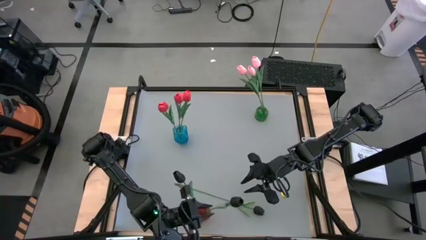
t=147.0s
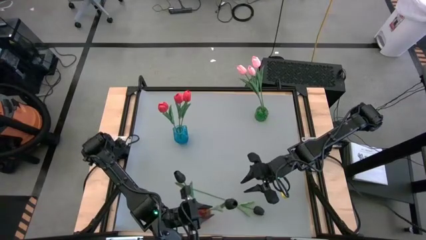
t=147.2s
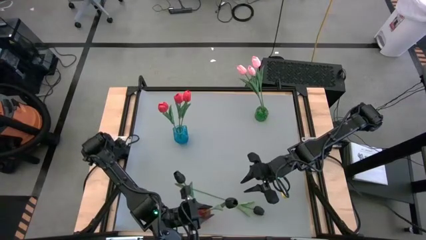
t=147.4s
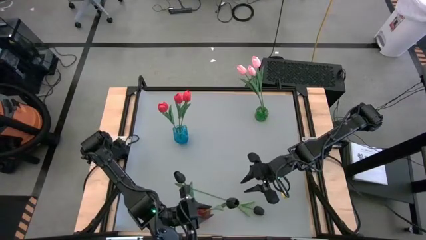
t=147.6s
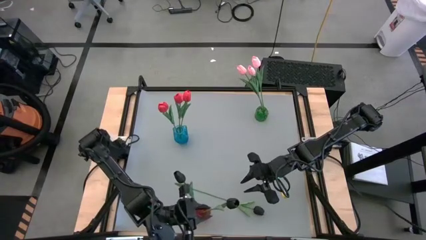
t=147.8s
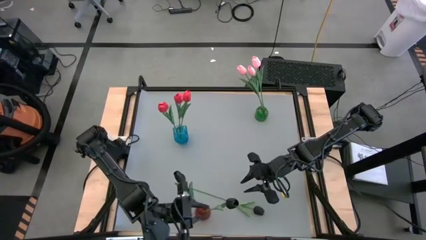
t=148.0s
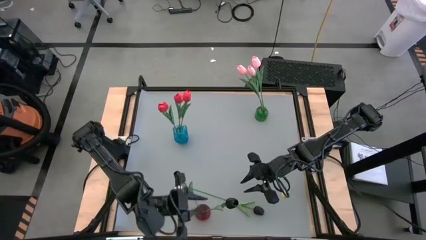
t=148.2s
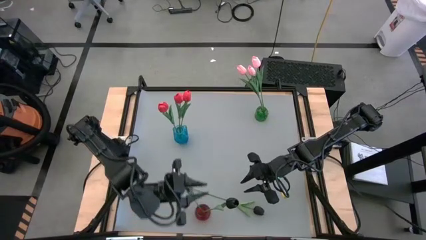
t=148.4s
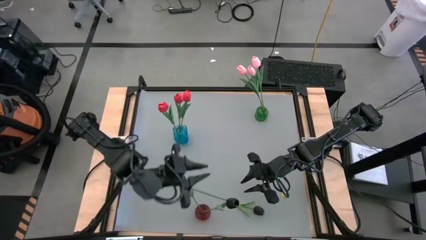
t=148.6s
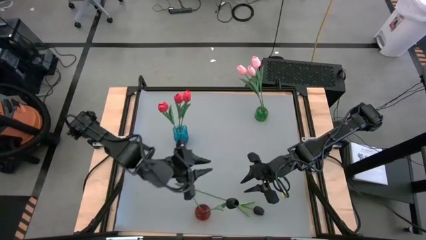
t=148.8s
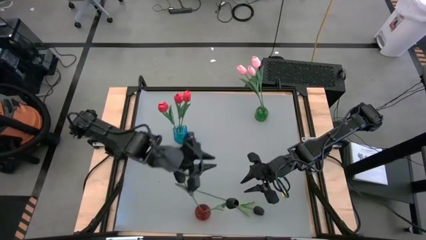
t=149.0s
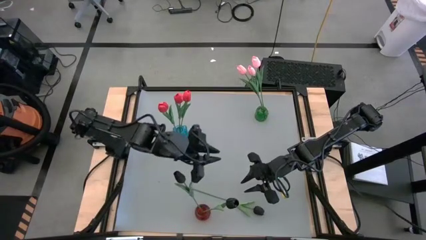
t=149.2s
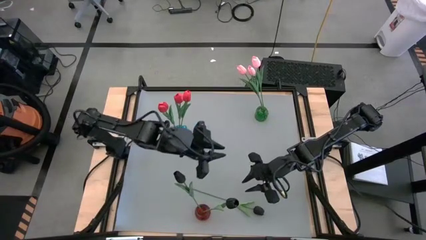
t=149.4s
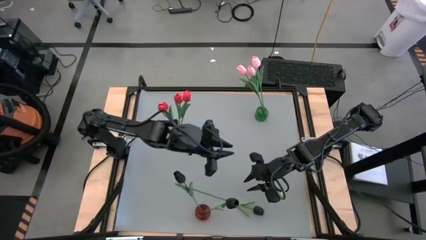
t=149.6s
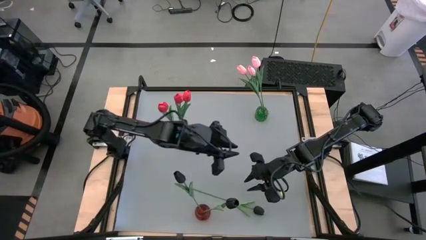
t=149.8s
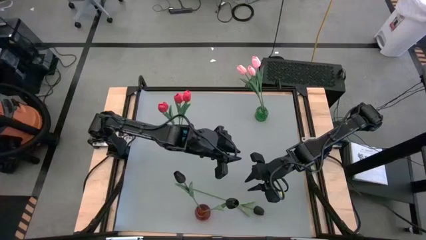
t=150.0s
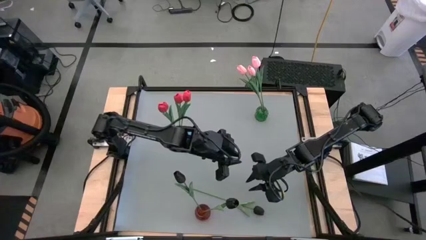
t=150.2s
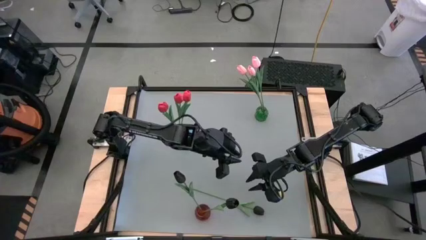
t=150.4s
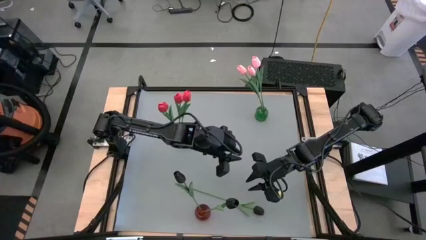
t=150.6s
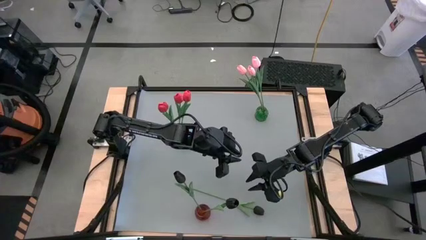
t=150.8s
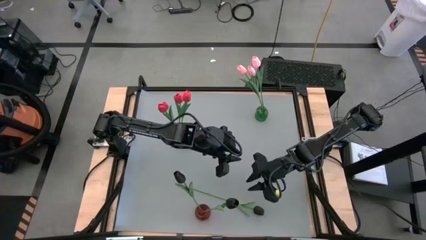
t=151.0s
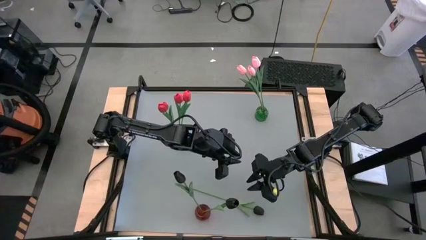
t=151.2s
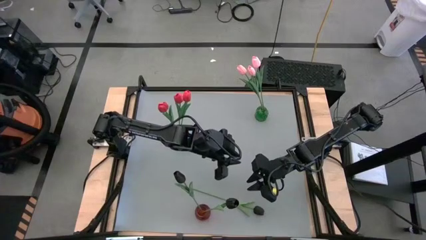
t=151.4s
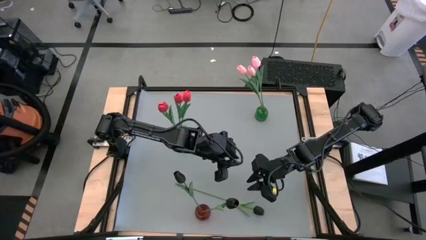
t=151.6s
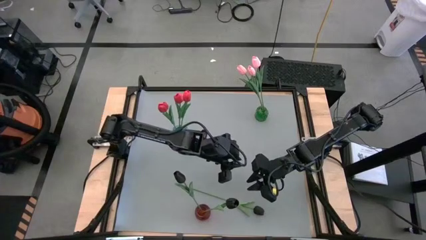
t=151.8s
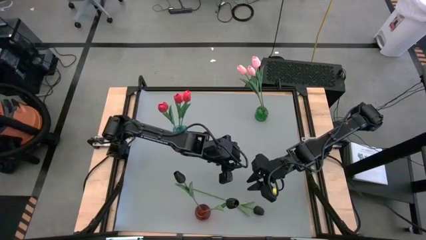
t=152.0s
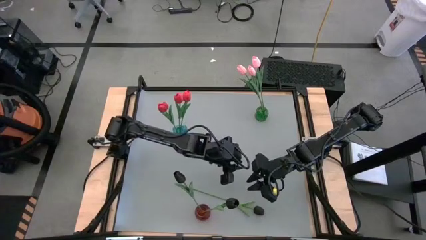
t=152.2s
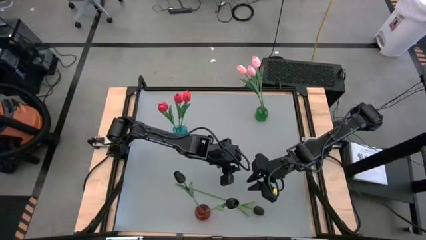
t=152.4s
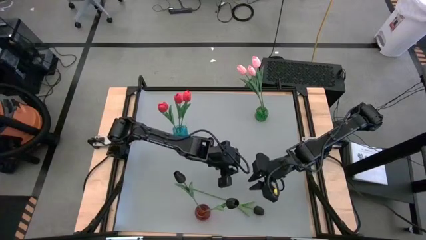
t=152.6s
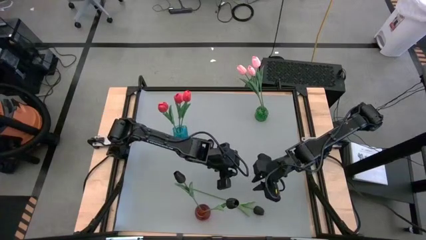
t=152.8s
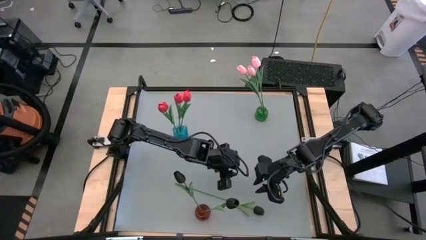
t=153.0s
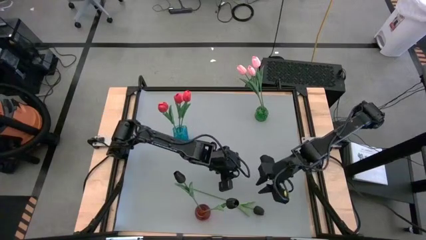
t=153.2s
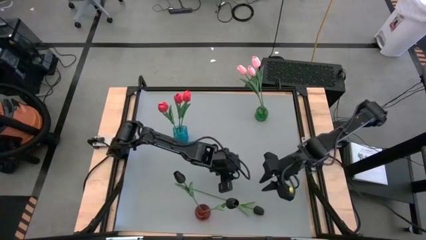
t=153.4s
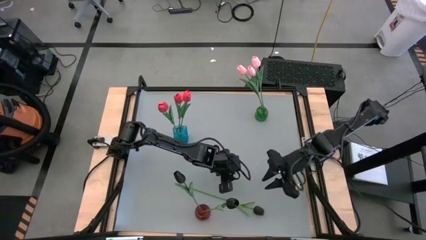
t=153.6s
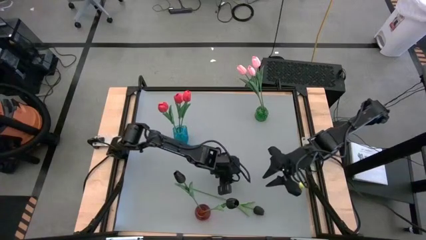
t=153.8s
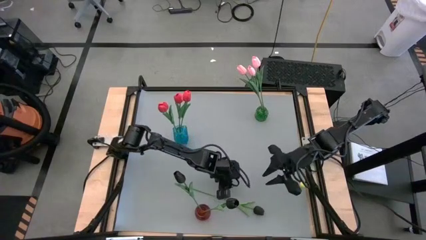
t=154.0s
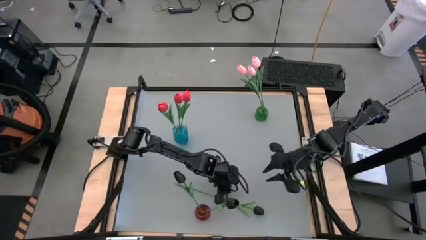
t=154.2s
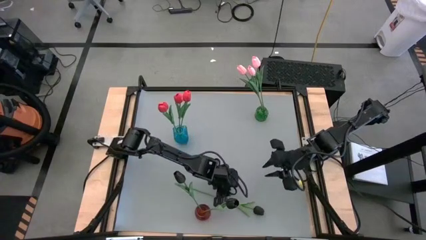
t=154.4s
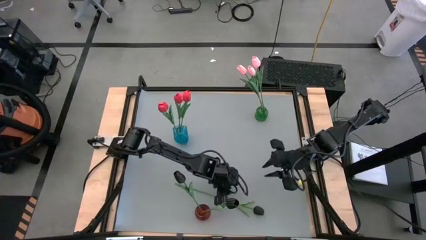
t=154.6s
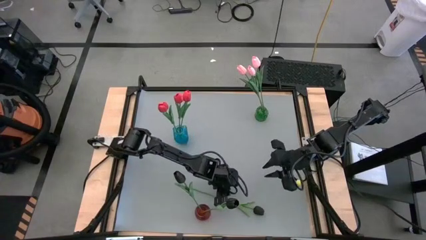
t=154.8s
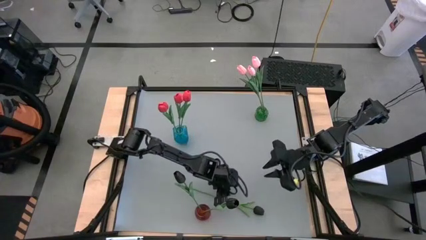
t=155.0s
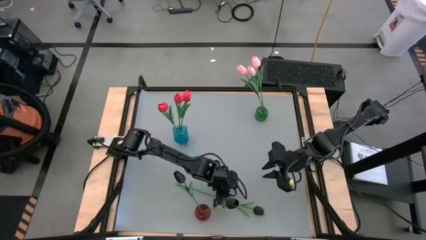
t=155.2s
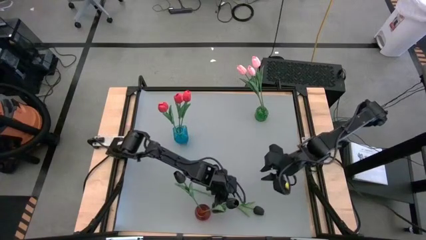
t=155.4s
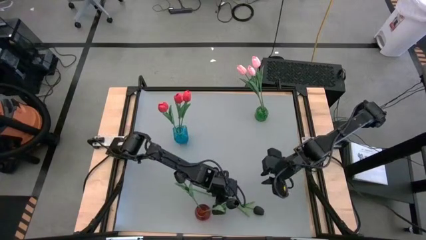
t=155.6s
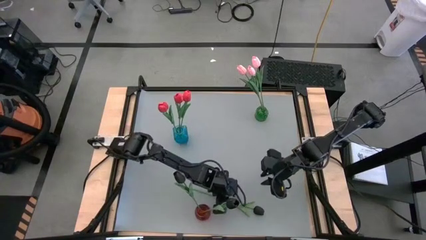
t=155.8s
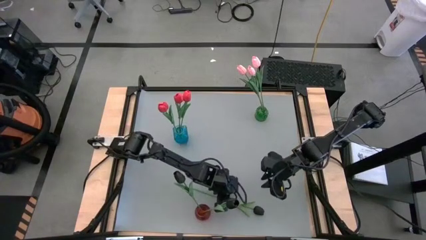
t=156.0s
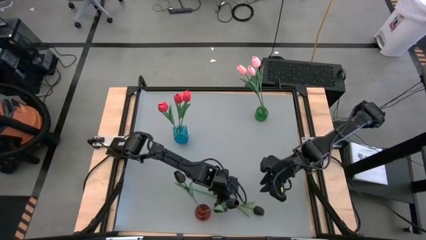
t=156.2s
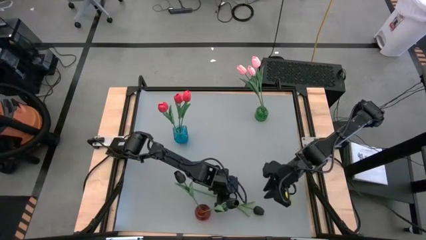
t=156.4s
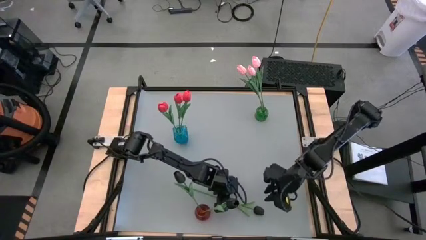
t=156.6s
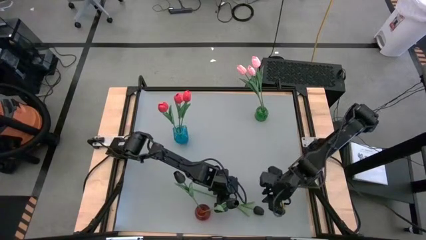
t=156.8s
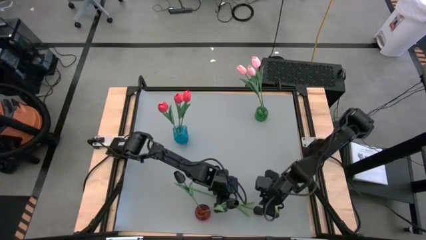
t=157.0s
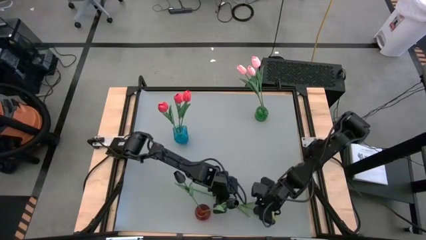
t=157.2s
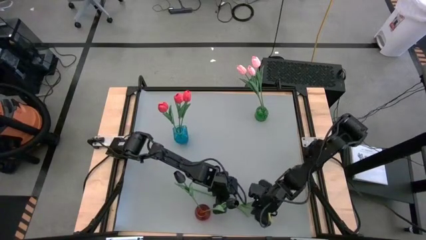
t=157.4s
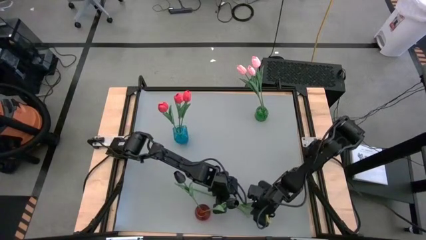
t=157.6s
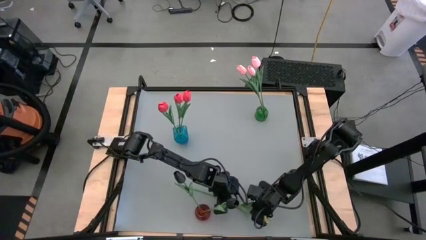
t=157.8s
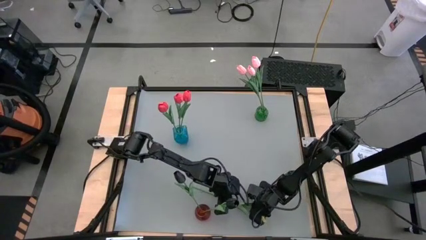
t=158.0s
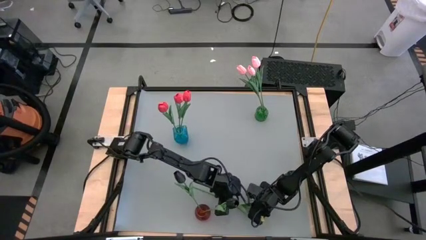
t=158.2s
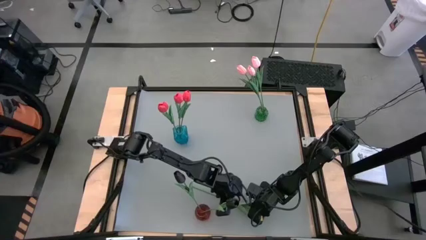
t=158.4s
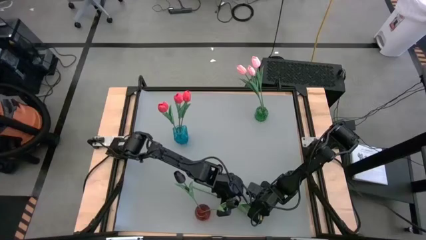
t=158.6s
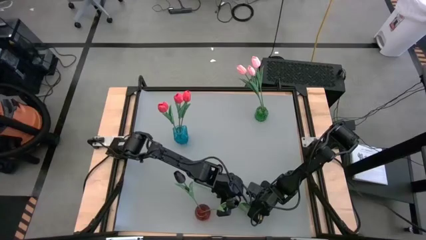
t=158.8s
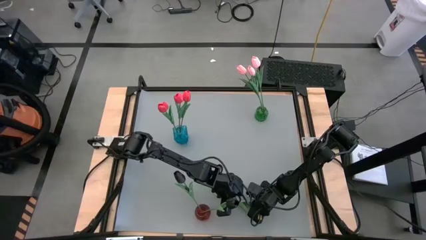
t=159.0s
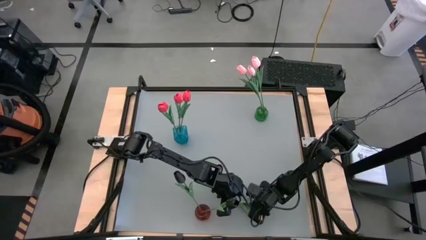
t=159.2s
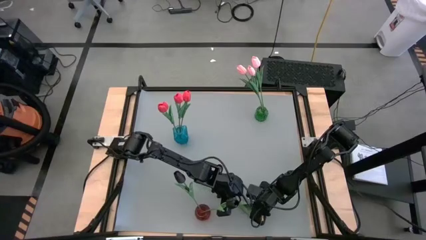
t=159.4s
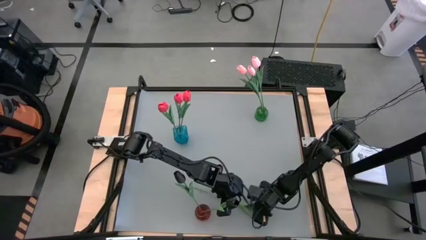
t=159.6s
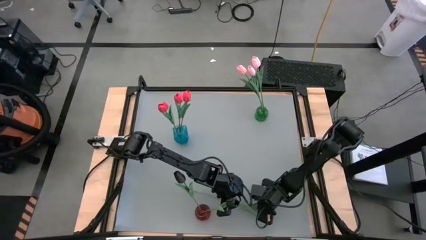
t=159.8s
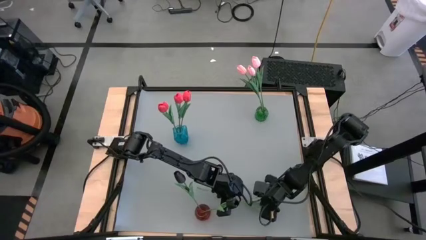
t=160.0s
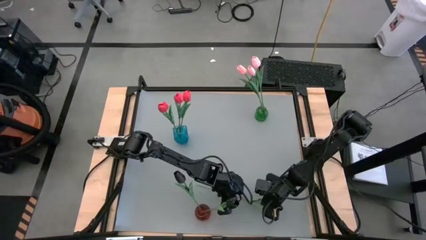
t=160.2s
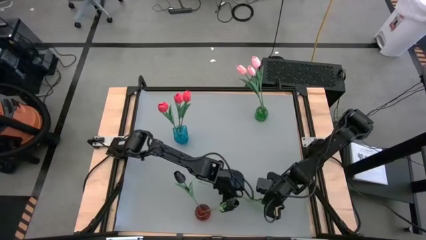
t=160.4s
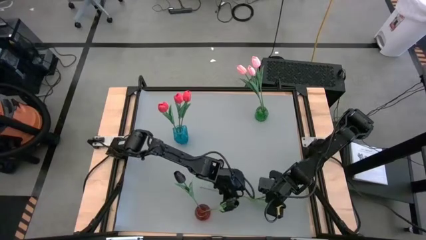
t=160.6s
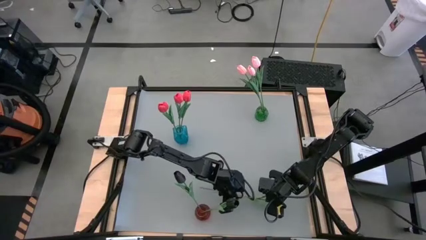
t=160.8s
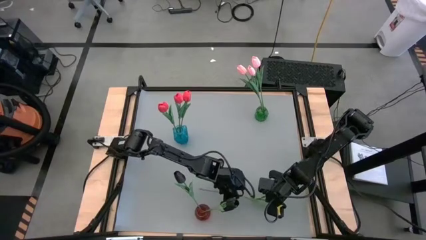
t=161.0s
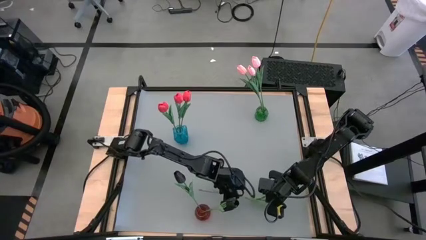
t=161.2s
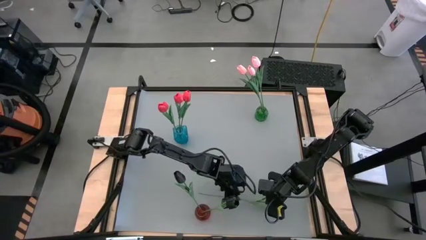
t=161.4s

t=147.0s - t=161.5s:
Task: Sort flowers into vase by color
Put the black flower into the red vase

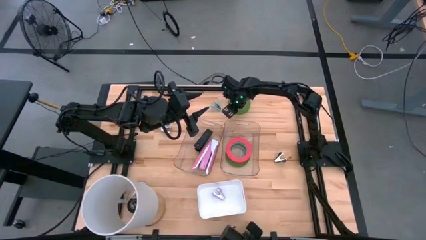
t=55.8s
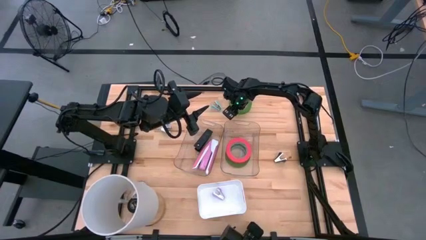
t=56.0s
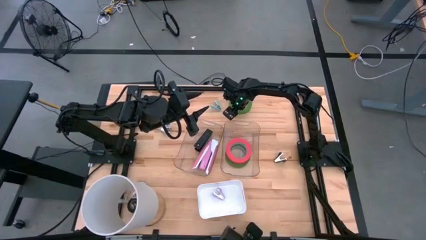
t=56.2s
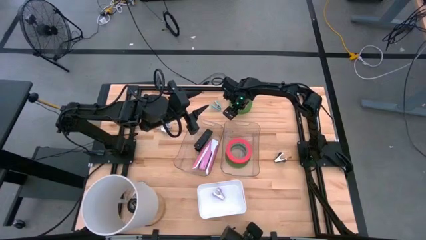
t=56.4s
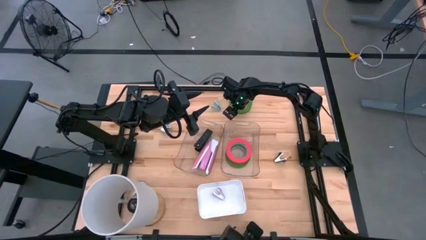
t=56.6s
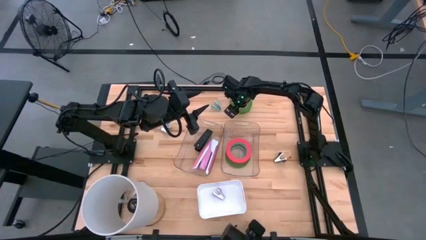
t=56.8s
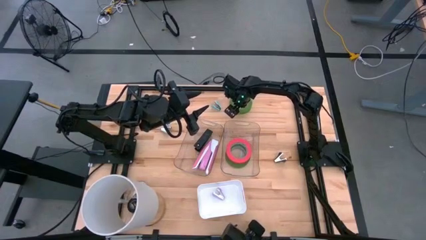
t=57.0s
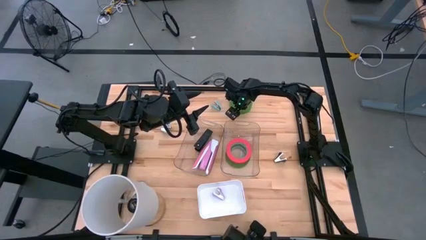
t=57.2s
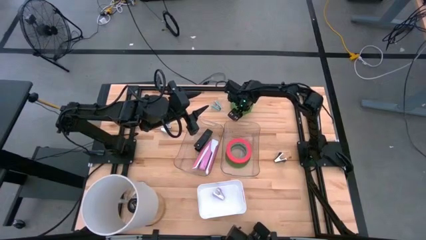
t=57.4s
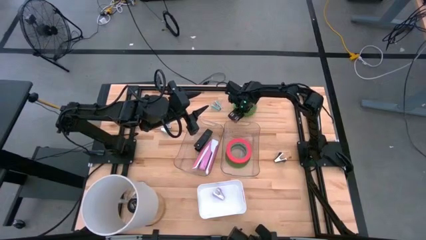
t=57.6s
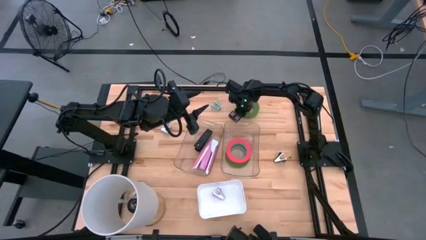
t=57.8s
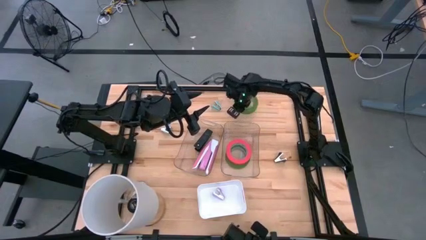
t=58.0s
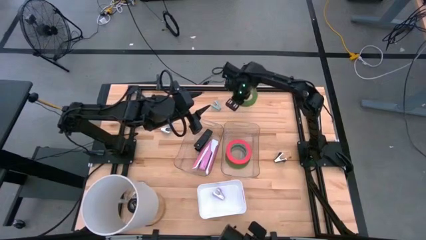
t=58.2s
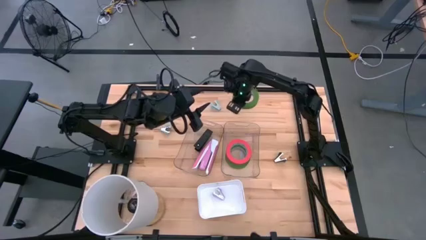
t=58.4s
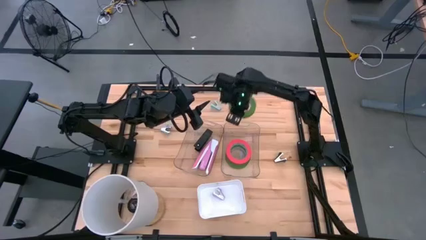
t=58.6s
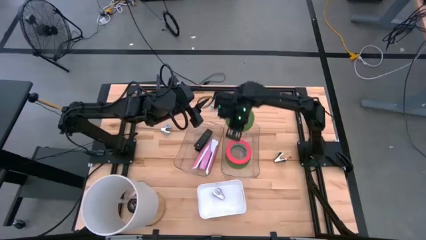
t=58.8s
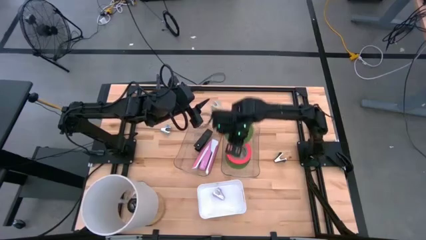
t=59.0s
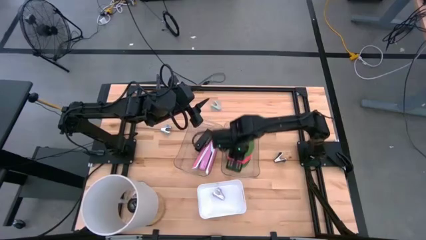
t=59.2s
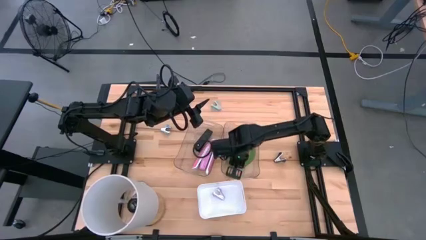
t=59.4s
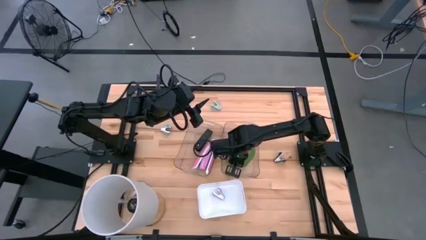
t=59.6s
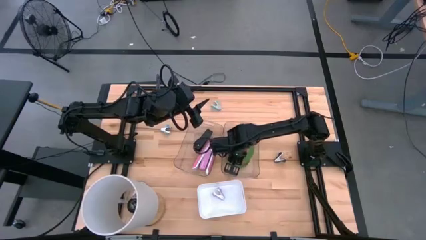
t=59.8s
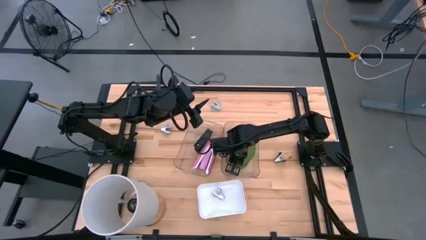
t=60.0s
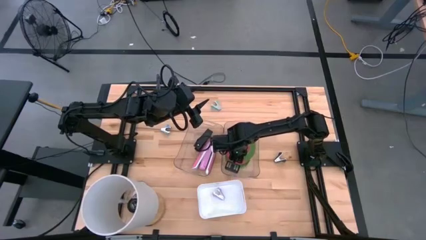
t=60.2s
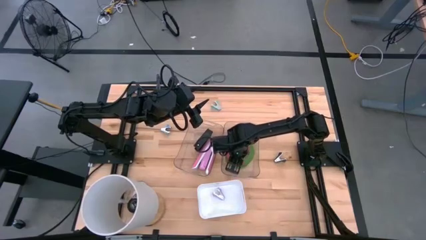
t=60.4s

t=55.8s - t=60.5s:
Task: Pick and place Stapler, Stapler remover, tape
Put the green tape into the right transparent bin
